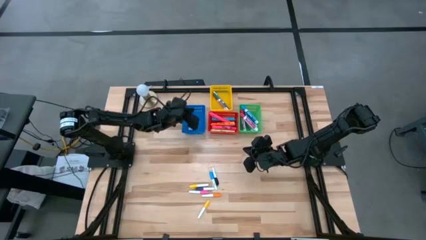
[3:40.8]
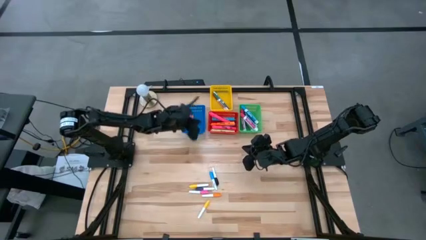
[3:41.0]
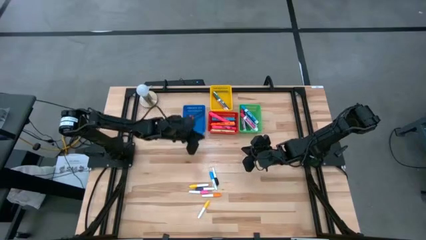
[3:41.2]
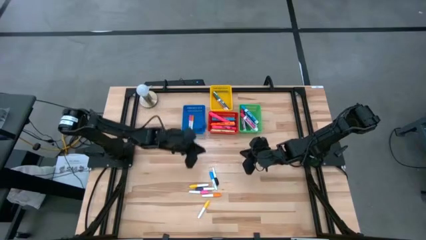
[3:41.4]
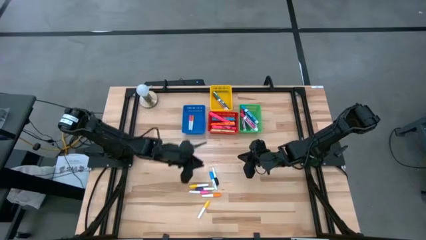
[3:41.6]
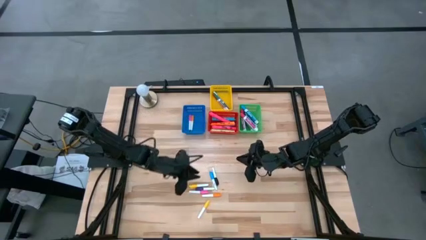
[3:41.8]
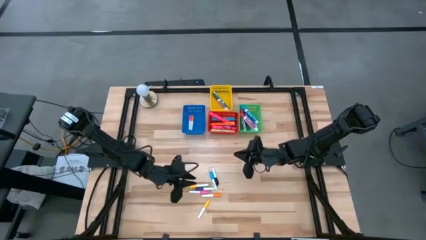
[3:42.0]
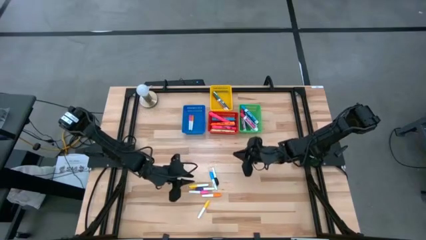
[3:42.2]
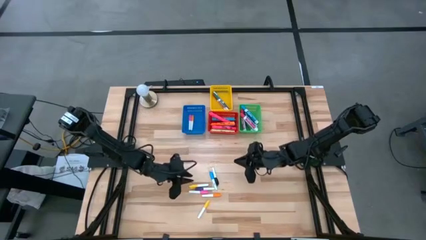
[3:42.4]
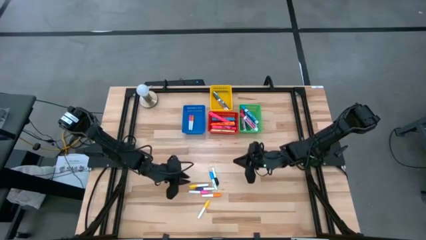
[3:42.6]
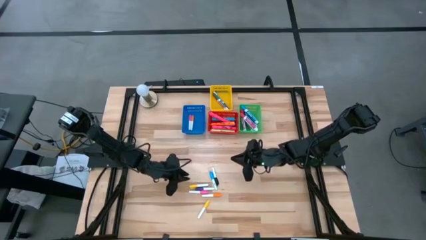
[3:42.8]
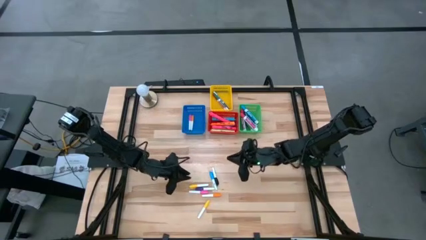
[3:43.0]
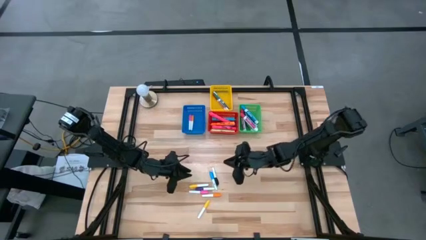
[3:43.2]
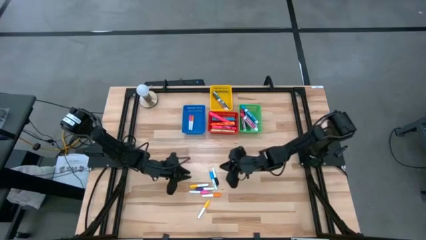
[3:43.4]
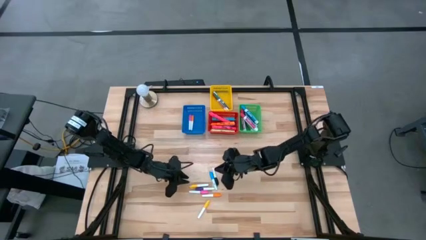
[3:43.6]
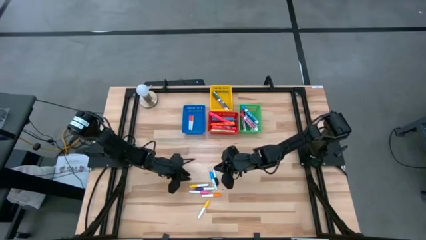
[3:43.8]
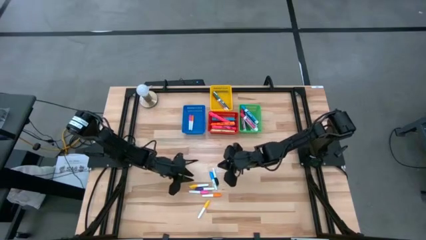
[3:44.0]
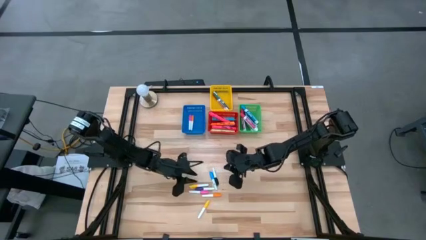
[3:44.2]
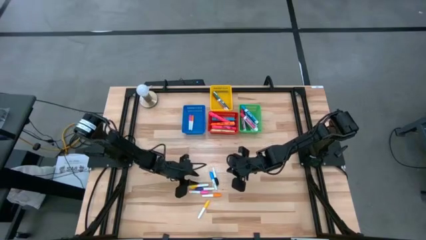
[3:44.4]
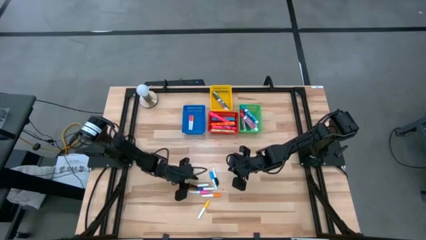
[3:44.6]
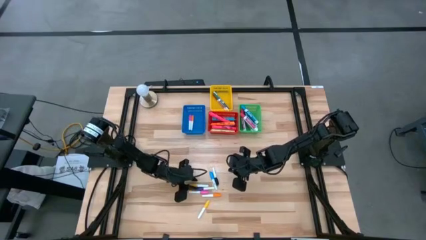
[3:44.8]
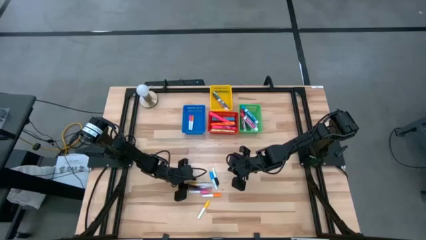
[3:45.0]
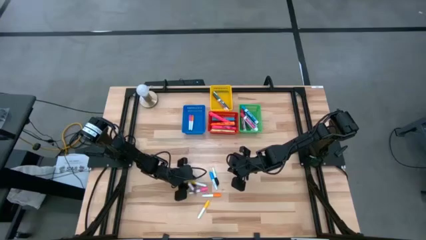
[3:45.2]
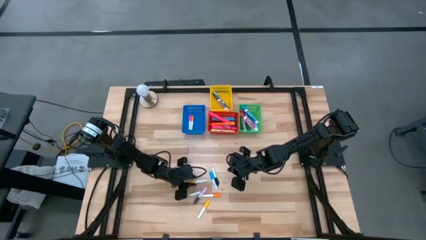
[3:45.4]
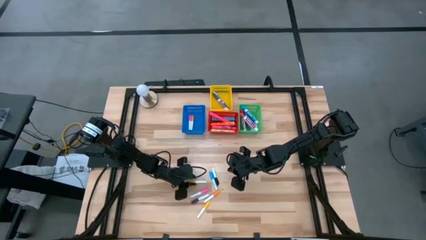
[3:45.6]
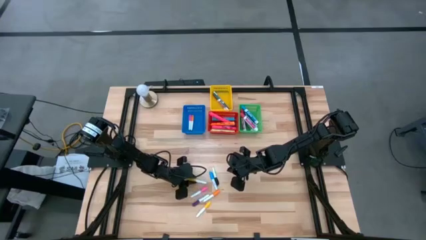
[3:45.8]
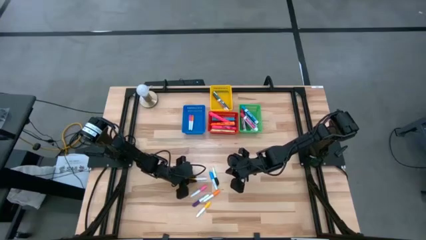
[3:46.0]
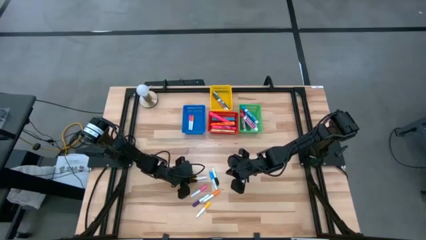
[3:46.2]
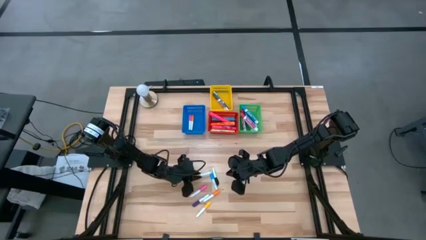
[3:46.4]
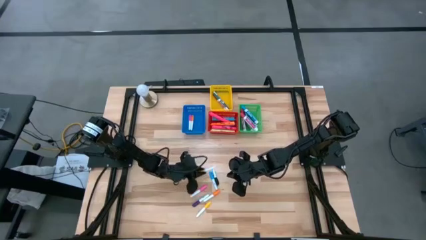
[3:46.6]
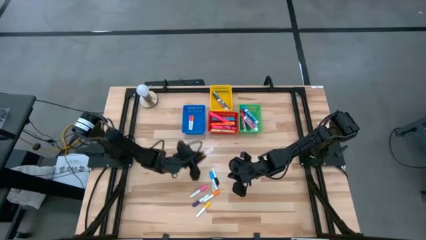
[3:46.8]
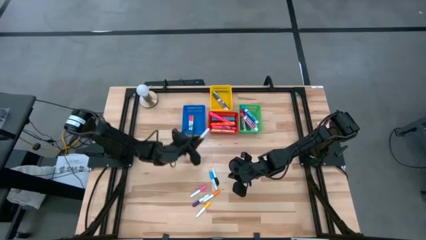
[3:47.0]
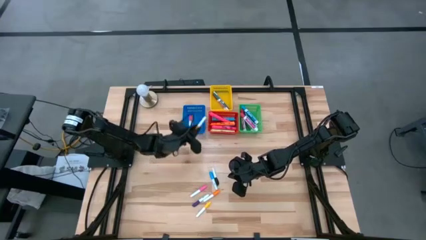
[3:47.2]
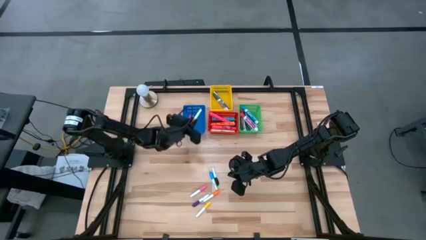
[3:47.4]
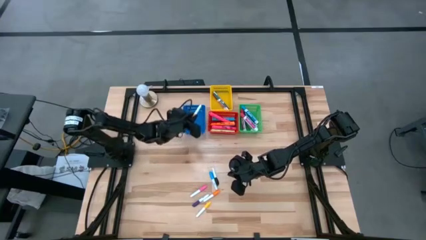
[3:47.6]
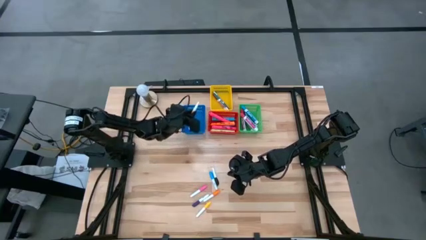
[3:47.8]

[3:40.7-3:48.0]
Task: Pick & Place Markers
Put the top small yellow highlighter pen into the blue bin

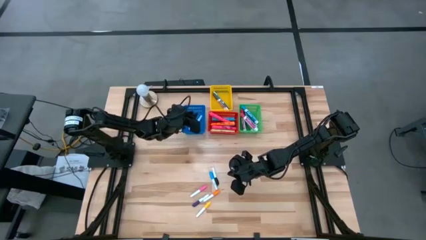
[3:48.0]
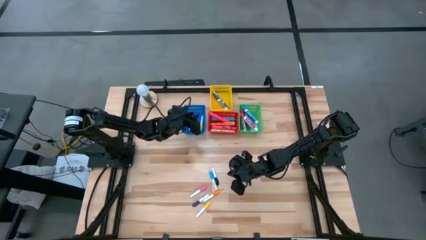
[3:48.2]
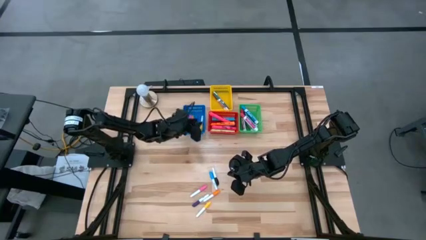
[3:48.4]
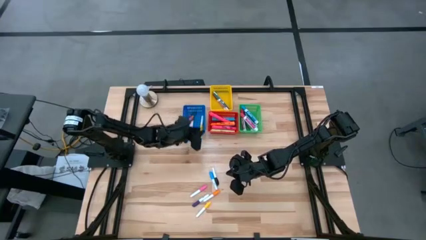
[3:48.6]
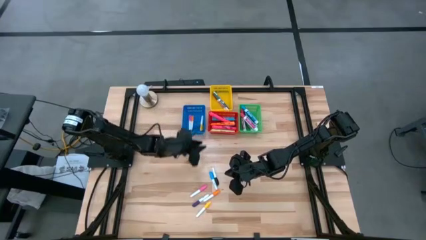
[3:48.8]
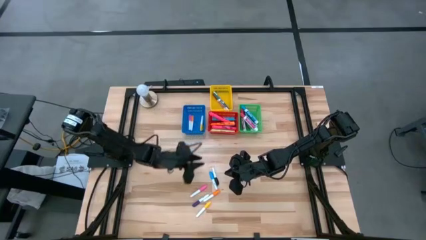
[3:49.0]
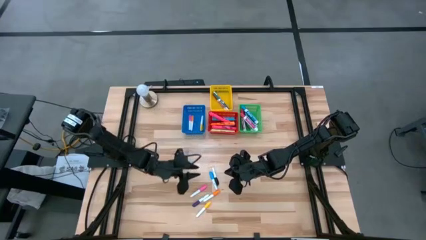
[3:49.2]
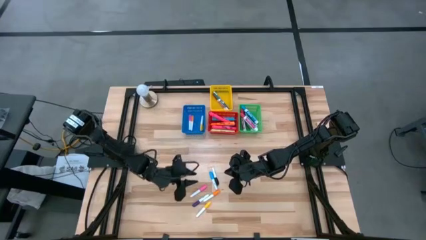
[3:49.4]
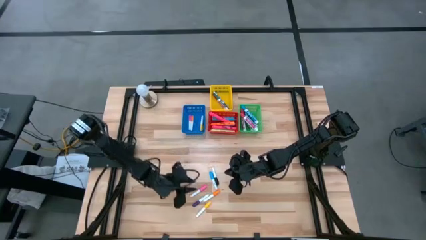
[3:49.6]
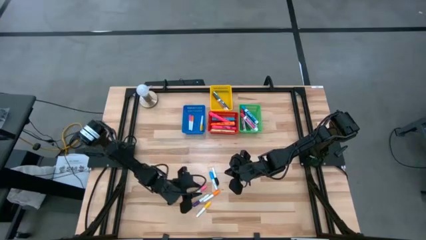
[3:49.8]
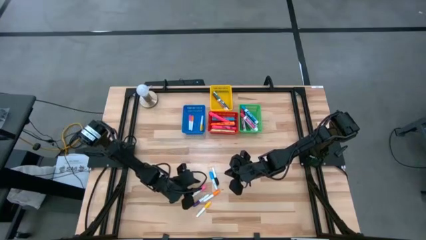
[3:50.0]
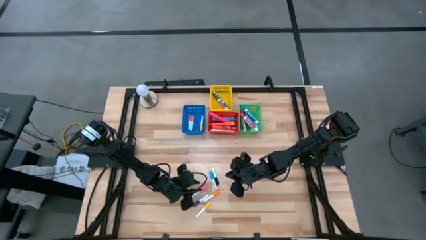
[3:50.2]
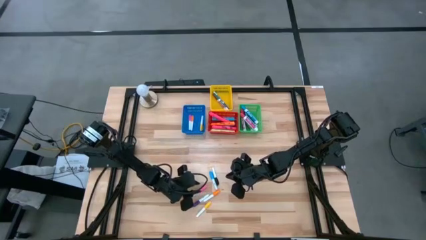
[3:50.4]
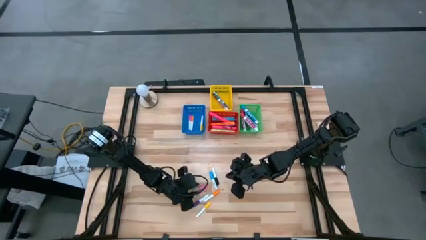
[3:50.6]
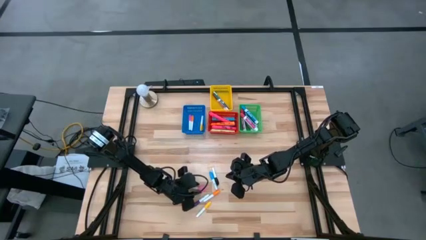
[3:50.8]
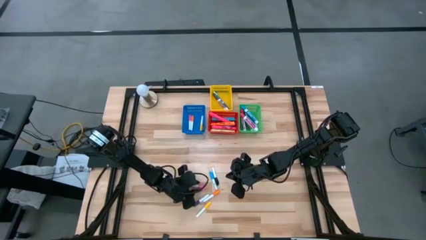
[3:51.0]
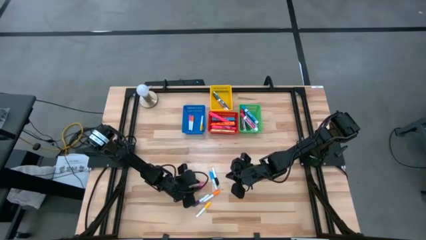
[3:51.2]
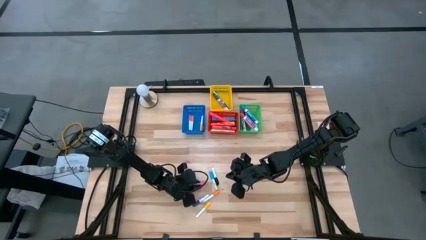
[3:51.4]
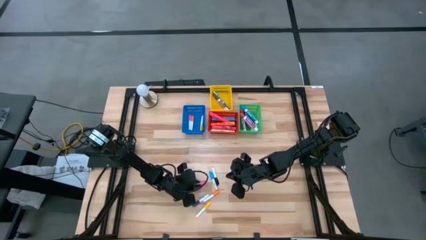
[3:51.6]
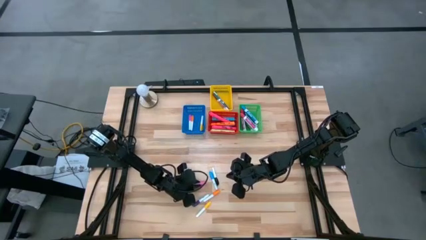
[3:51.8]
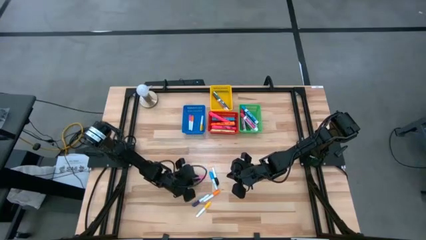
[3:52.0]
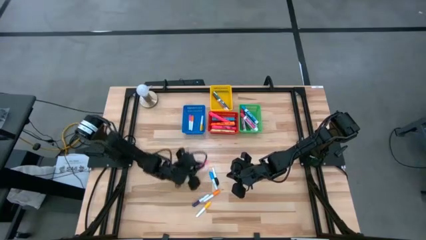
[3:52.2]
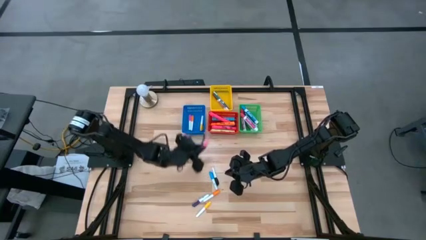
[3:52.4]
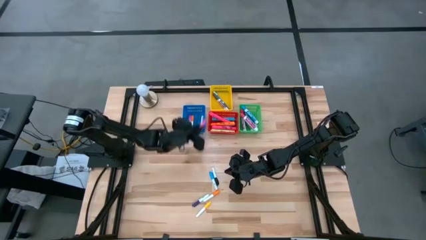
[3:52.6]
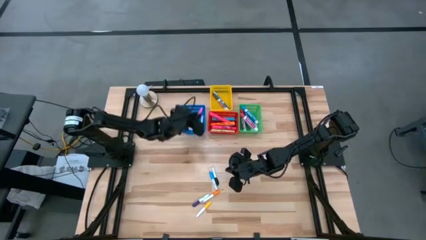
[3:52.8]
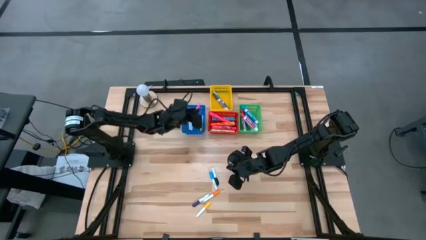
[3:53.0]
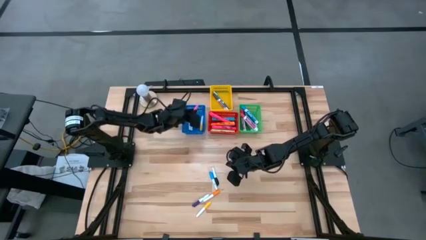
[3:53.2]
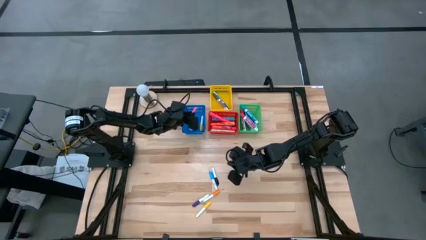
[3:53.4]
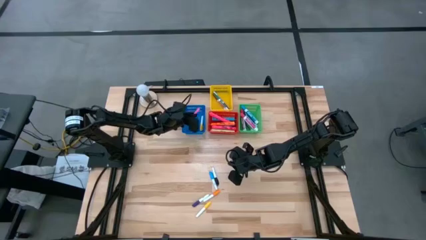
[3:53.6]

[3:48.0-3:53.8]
Put the small pink highlighter pen into the blue bin
